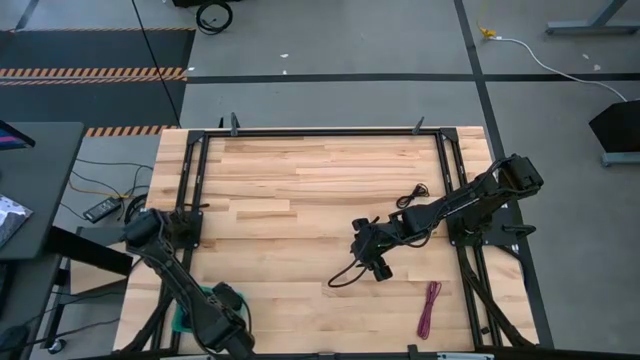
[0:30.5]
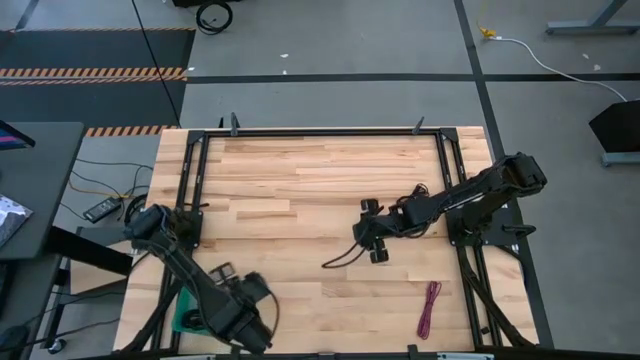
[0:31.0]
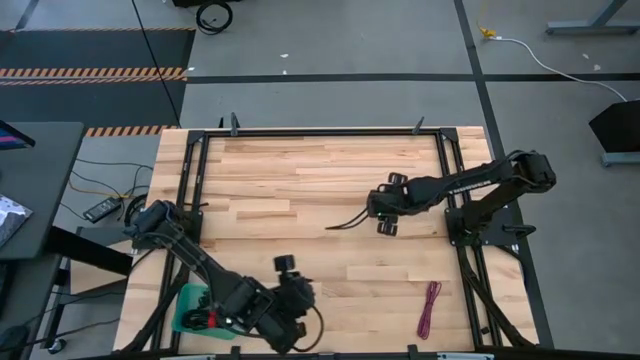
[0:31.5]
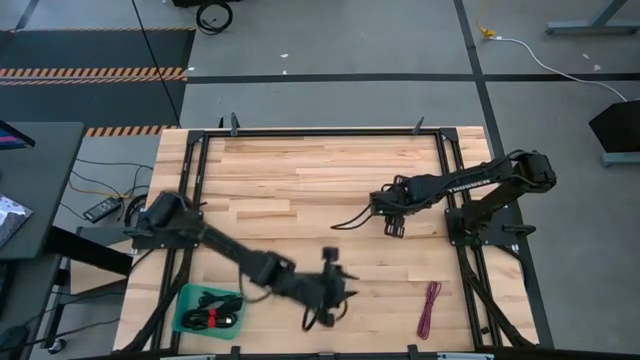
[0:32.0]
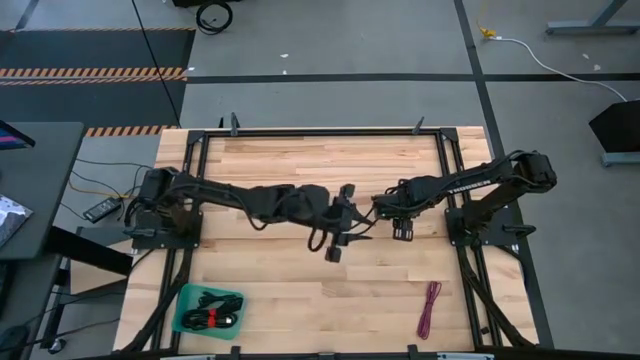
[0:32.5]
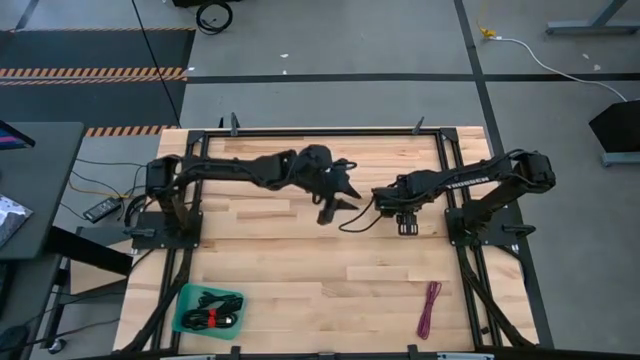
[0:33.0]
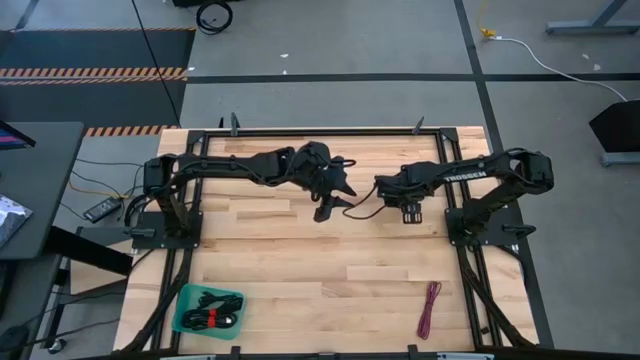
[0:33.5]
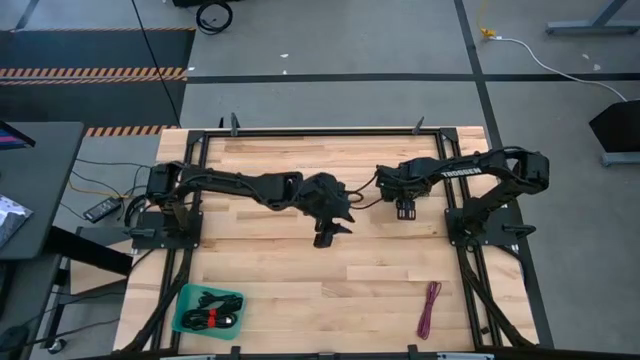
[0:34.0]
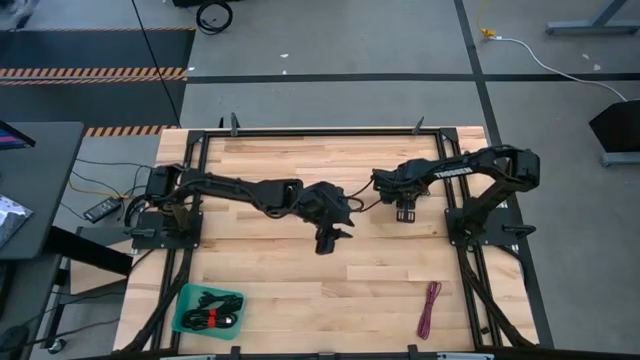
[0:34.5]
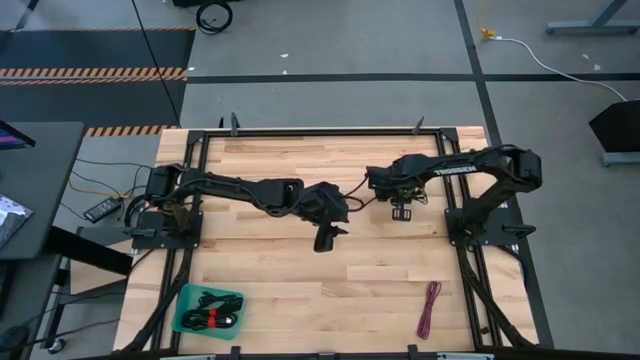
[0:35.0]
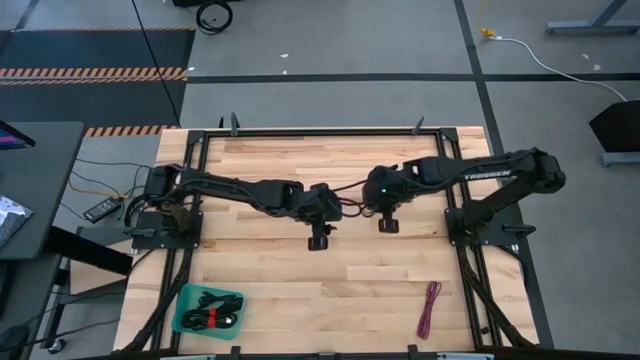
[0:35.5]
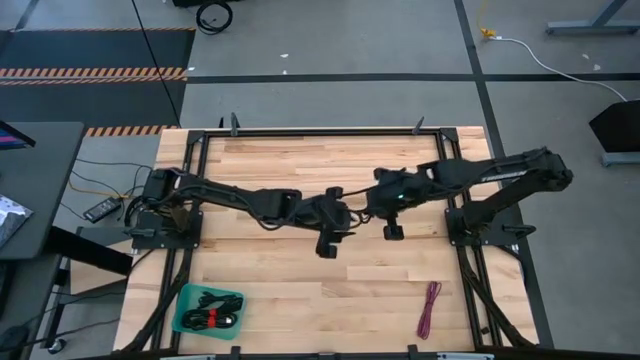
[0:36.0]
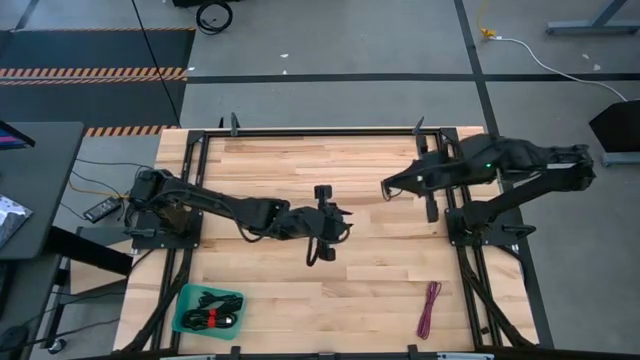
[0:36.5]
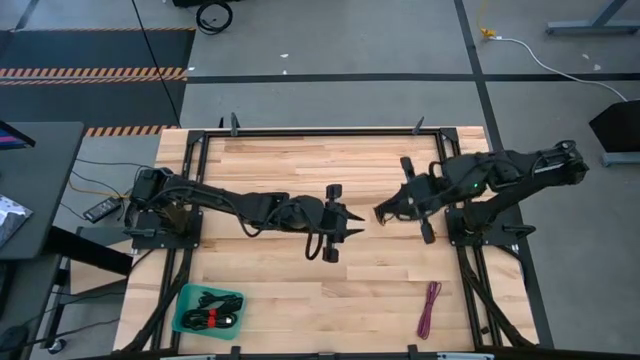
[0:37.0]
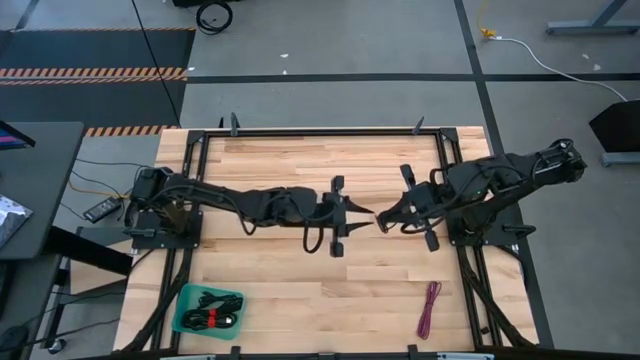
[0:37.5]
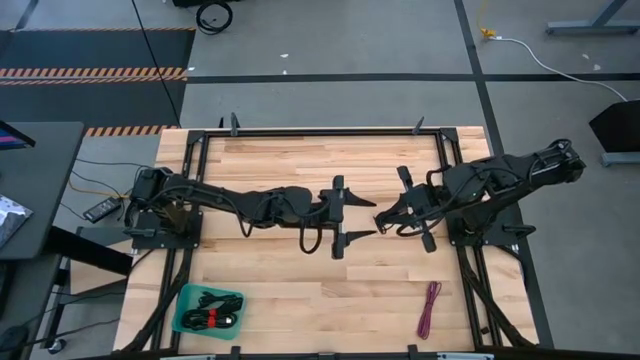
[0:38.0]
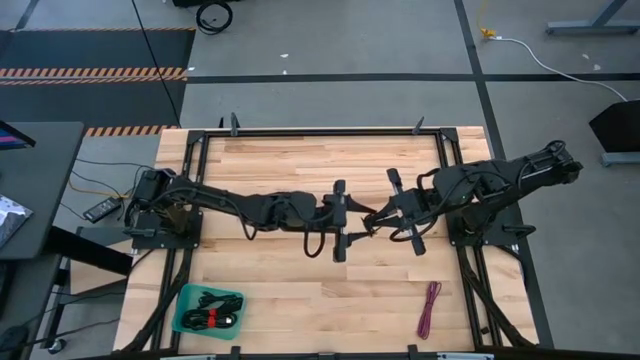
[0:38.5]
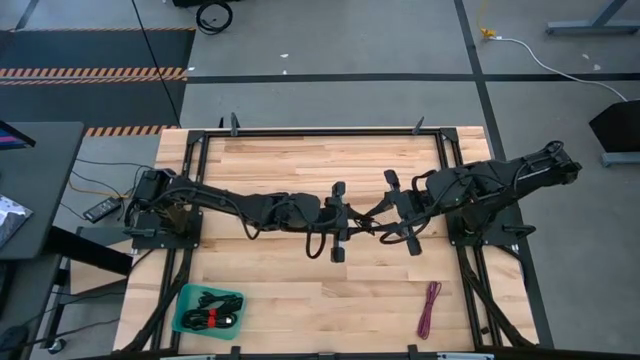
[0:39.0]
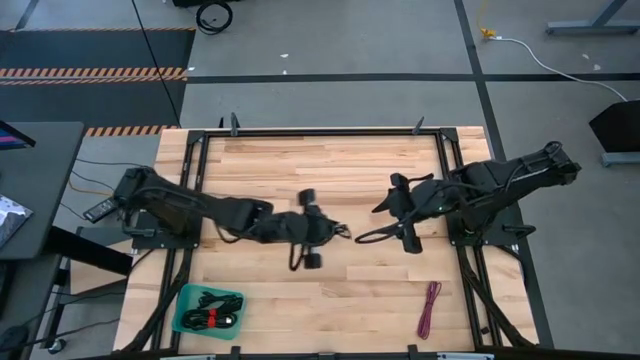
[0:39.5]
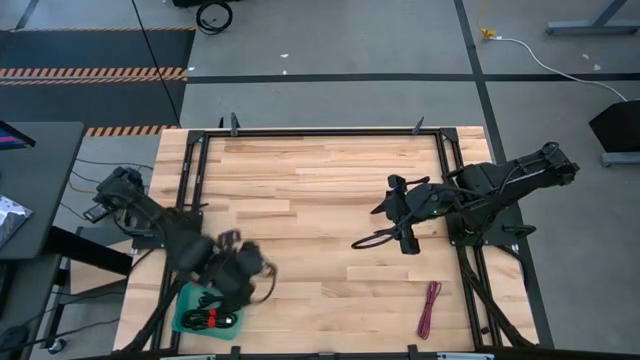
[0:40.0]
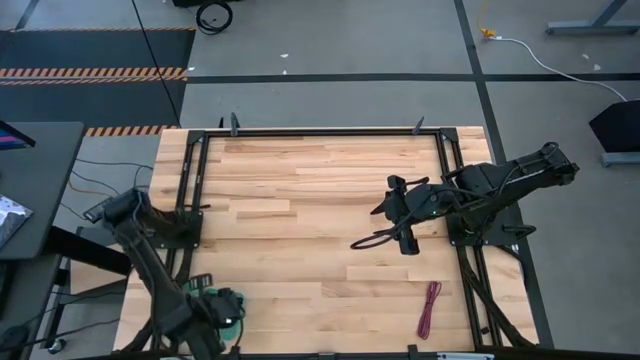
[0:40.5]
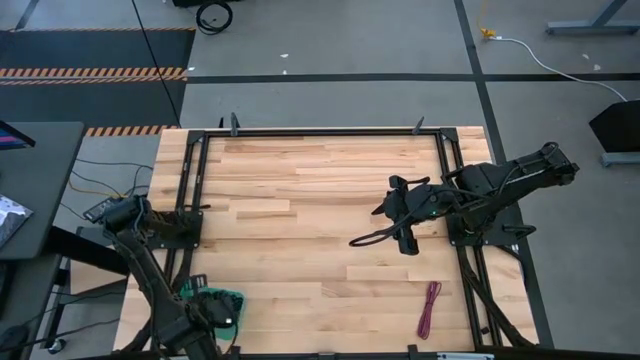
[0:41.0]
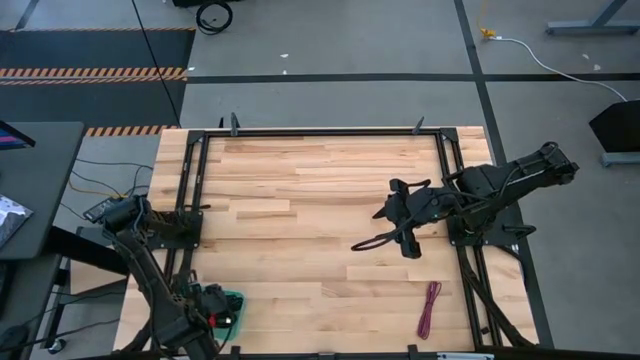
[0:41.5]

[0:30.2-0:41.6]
Task: Pick and place USB-C Cables
Put the black charger cable into the green bin

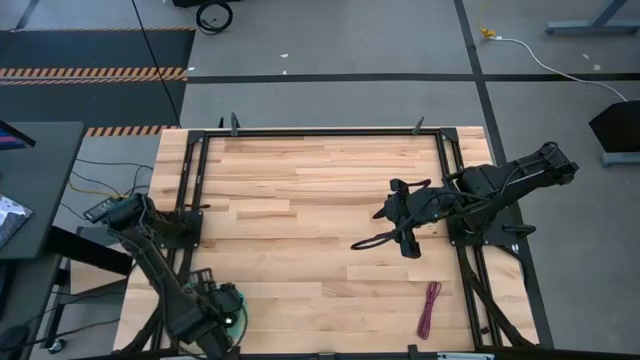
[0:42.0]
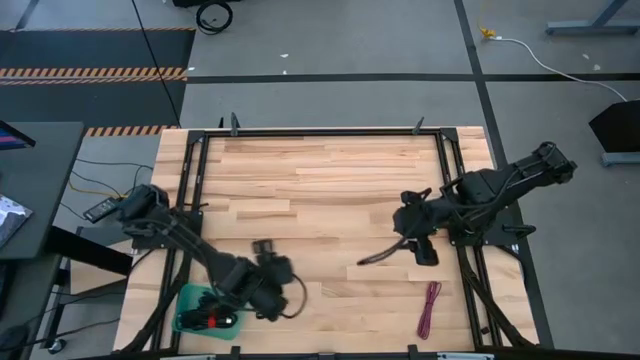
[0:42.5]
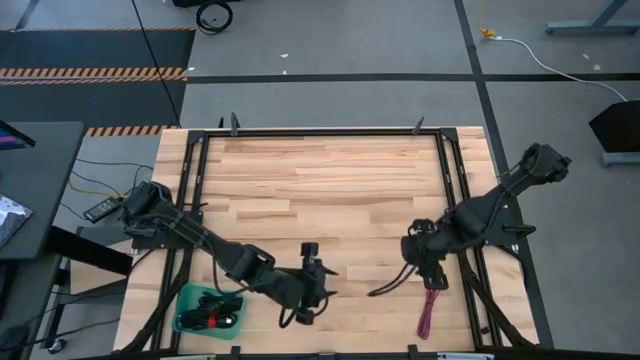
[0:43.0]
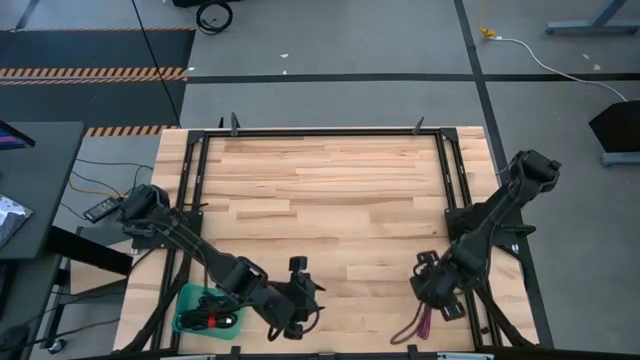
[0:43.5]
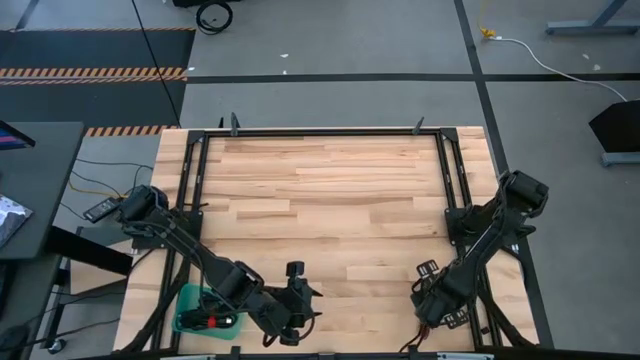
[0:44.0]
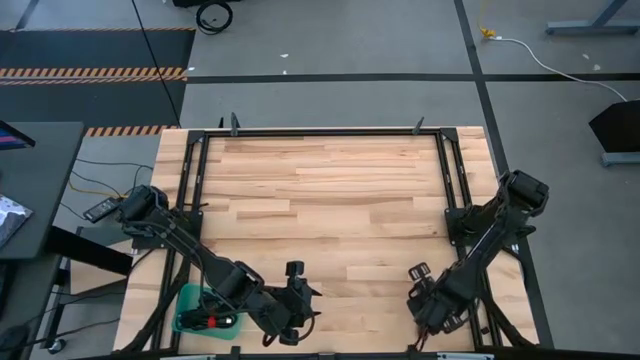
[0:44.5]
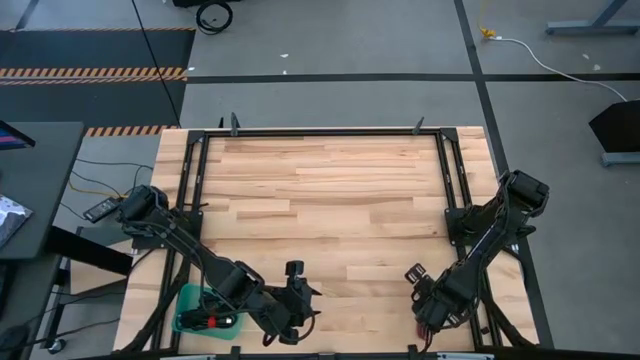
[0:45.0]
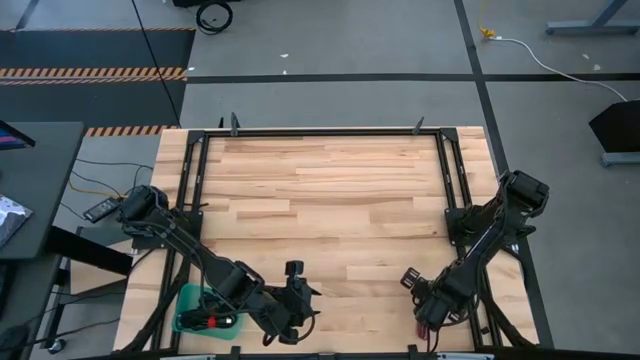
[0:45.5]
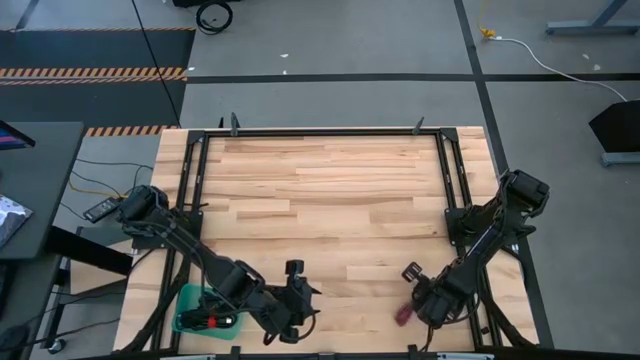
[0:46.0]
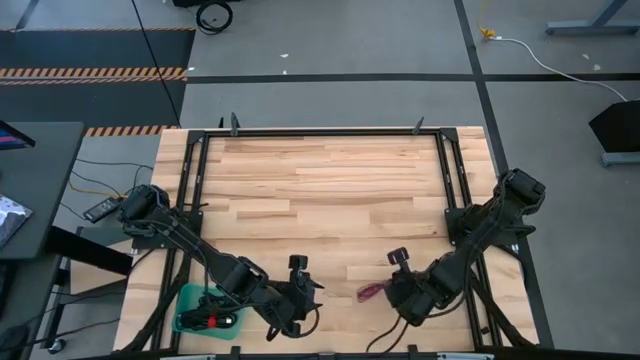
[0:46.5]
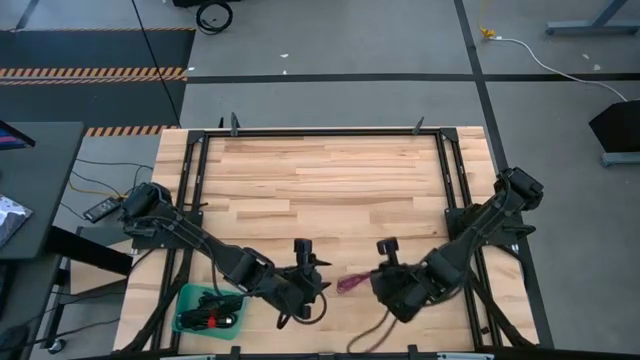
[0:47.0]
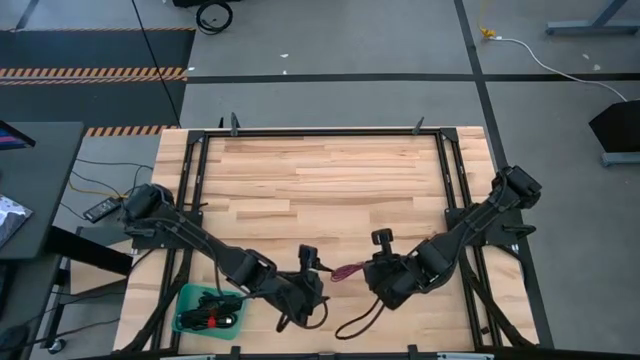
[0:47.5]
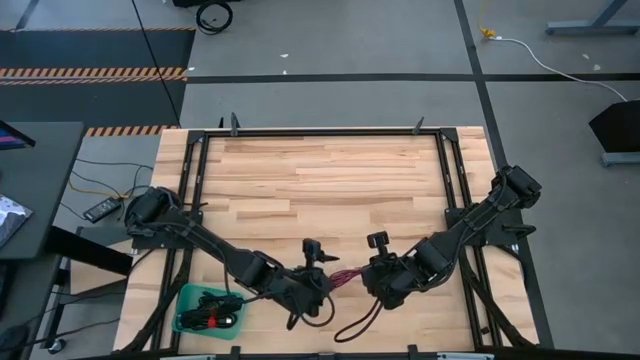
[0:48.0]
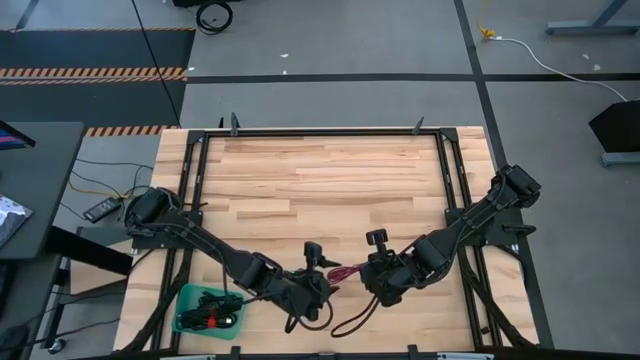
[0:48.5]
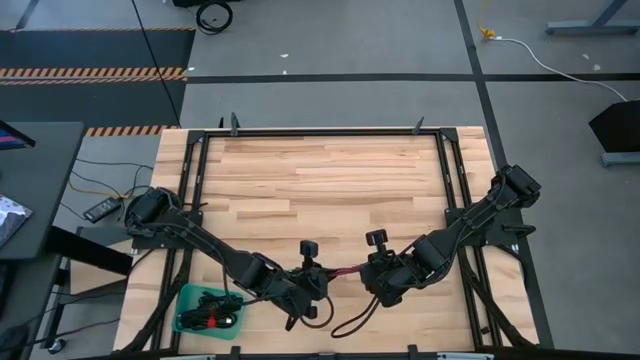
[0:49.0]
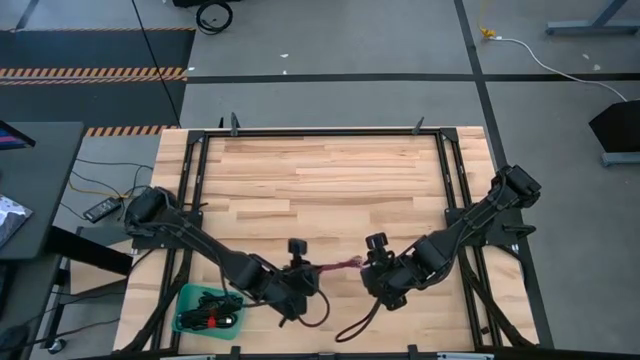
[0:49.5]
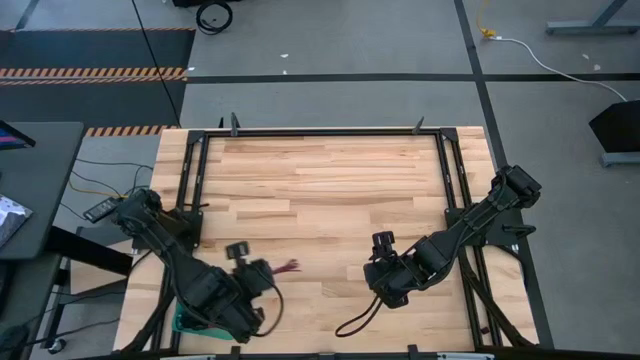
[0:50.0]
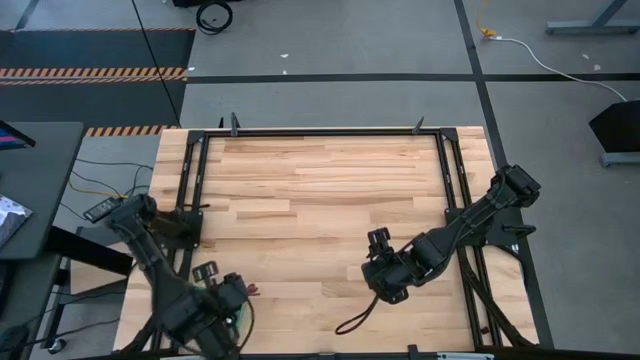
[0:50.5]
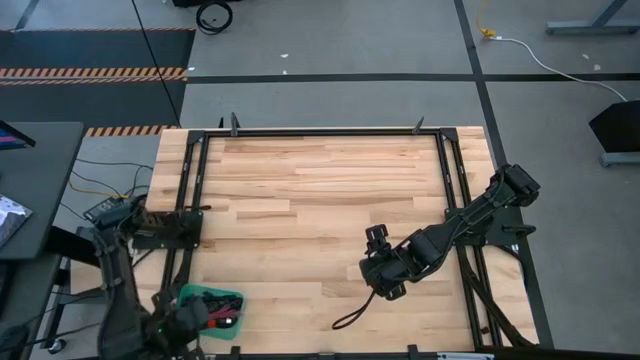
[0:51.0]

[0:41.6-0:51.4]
Put the pink charger cable into the green bin

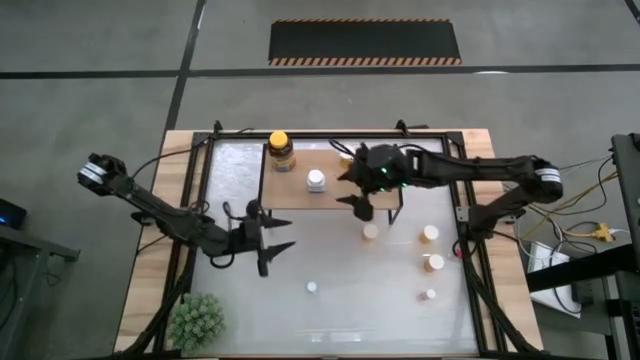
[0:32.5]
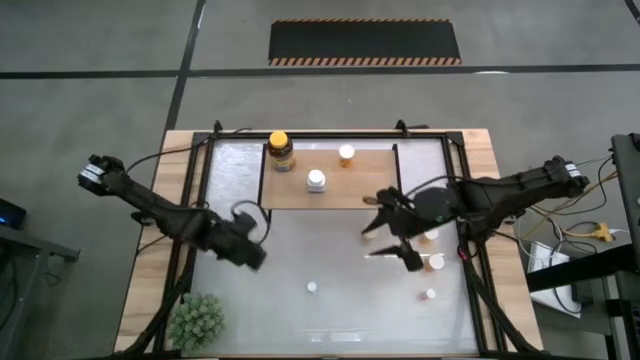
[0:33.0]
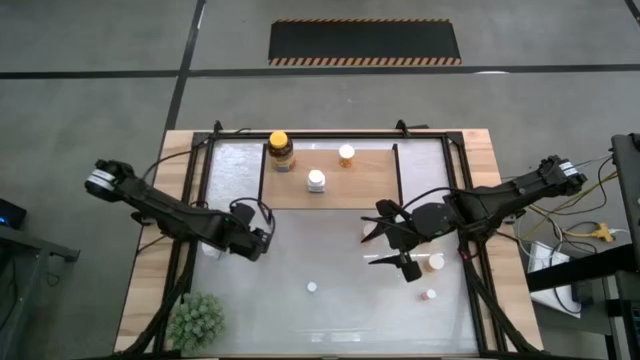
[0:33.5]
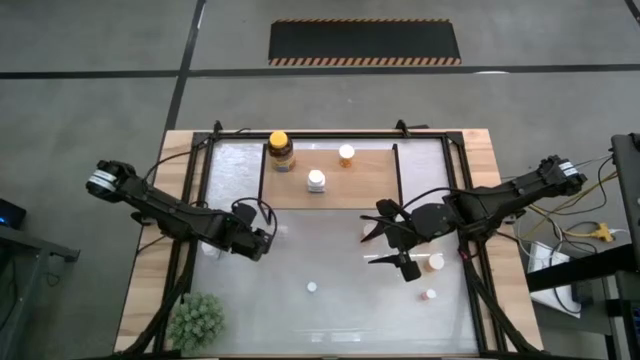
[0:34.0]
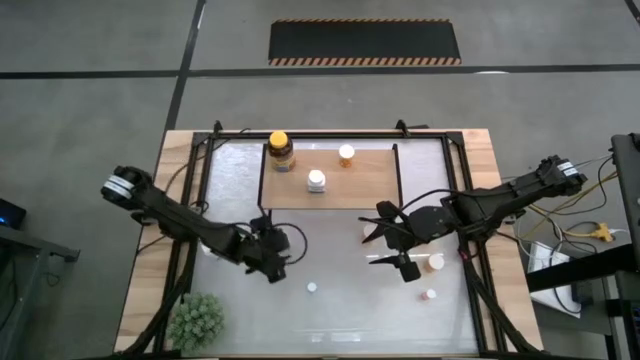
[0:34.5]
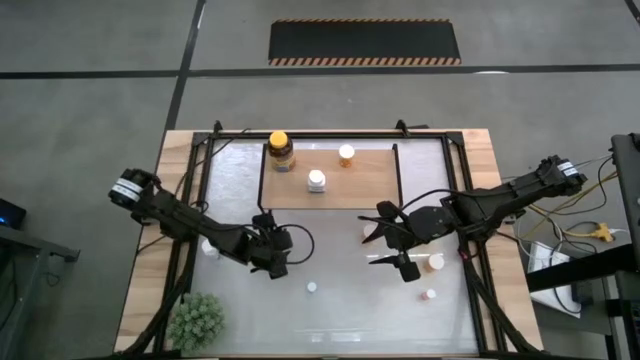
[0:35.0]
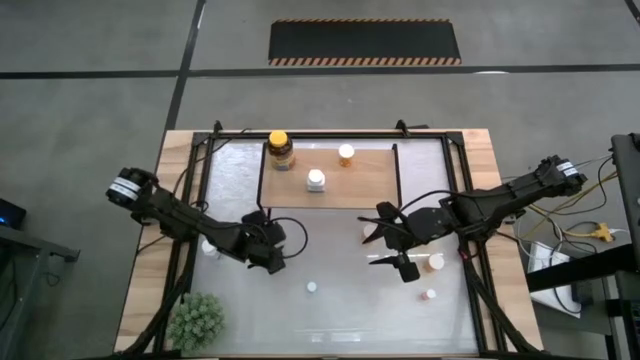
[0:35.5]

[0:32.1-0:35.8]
Task: Pick and place medicine bottles onto shelf by color
Put the white pill bottle on the shelf
